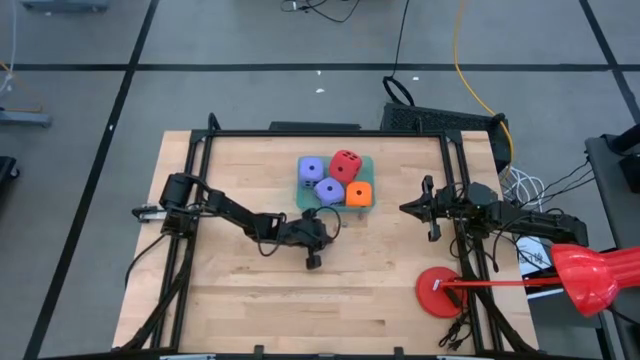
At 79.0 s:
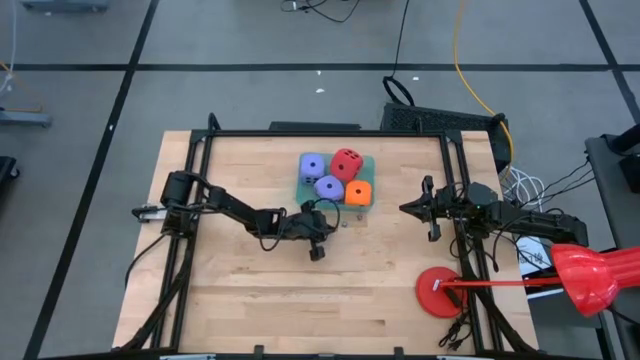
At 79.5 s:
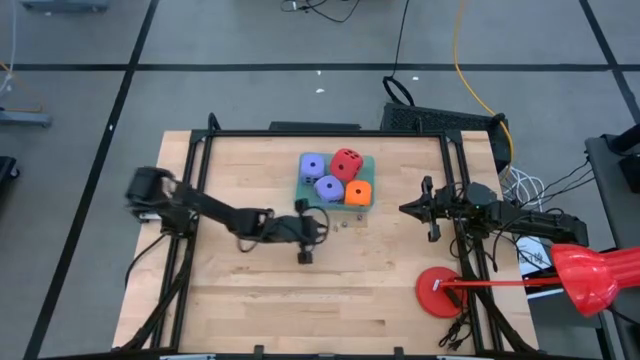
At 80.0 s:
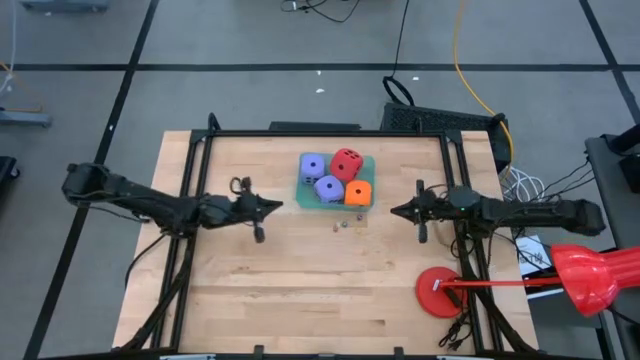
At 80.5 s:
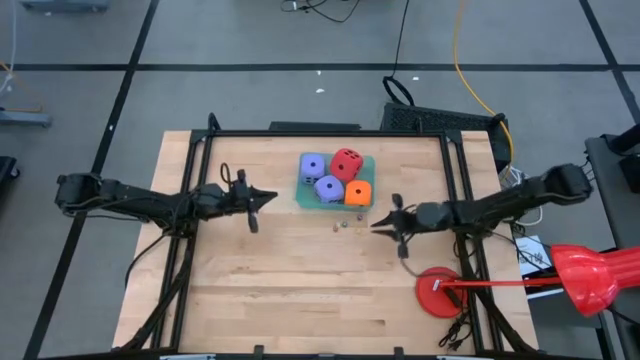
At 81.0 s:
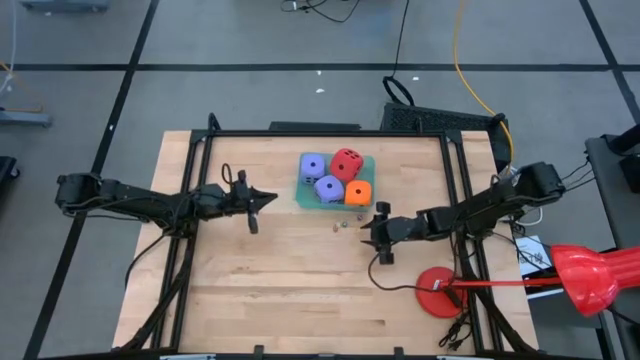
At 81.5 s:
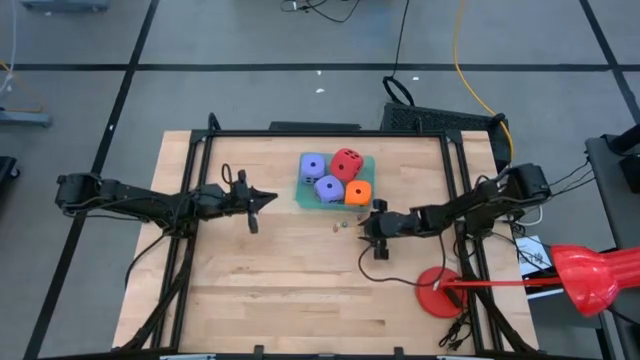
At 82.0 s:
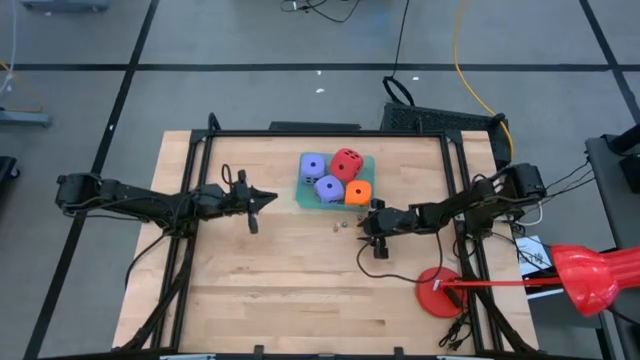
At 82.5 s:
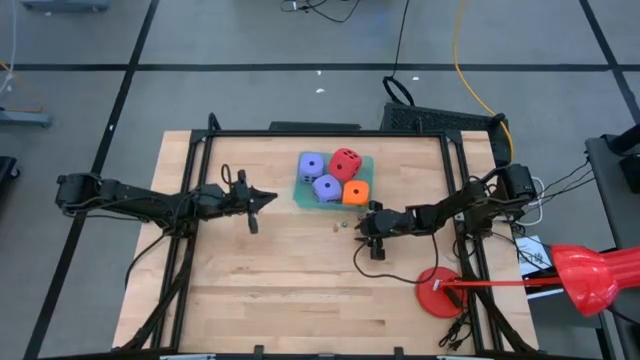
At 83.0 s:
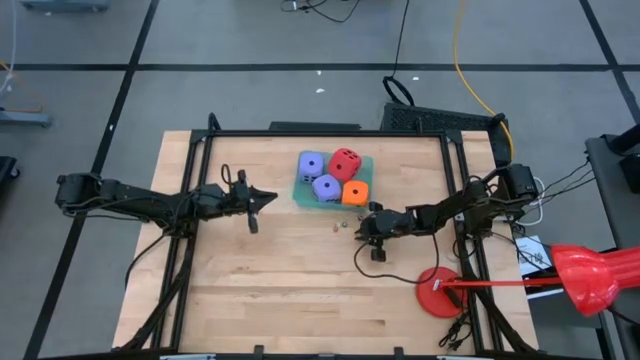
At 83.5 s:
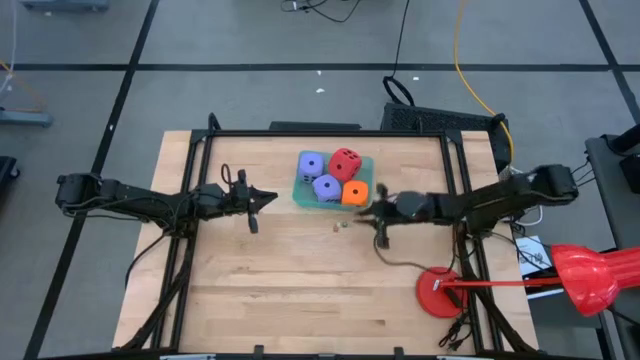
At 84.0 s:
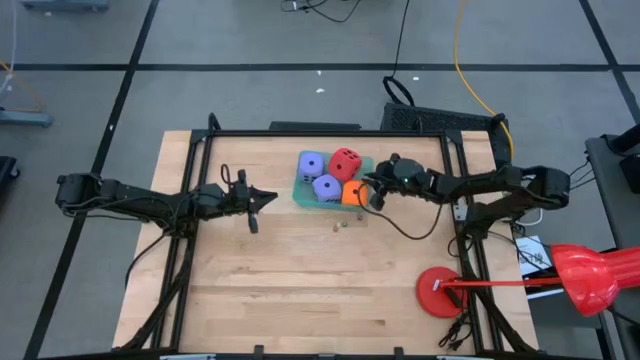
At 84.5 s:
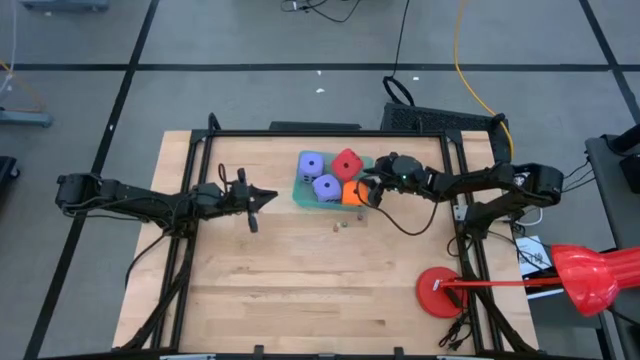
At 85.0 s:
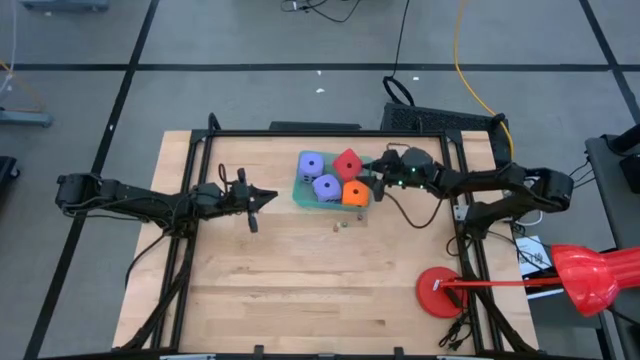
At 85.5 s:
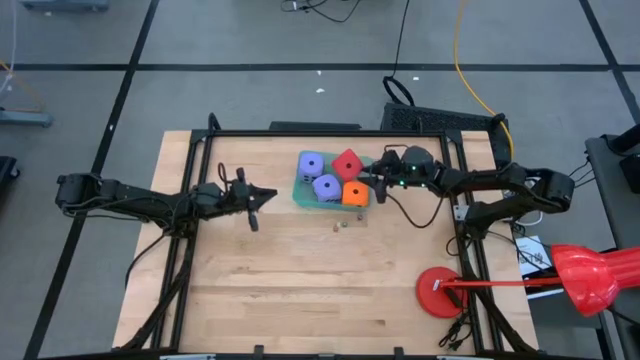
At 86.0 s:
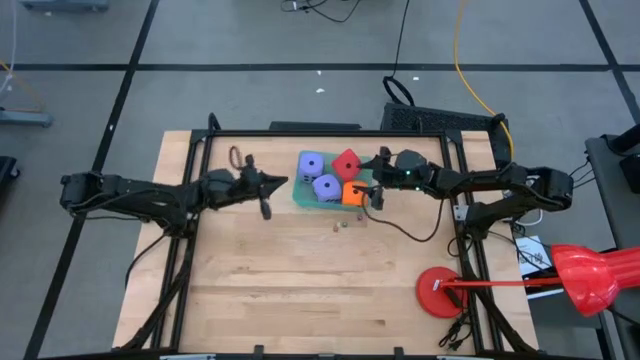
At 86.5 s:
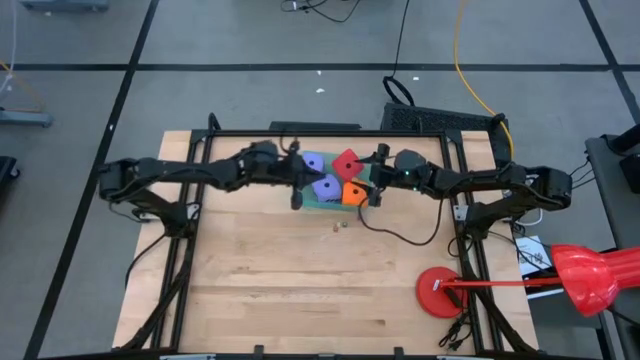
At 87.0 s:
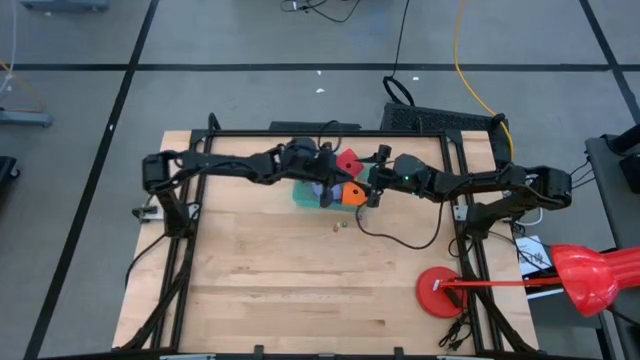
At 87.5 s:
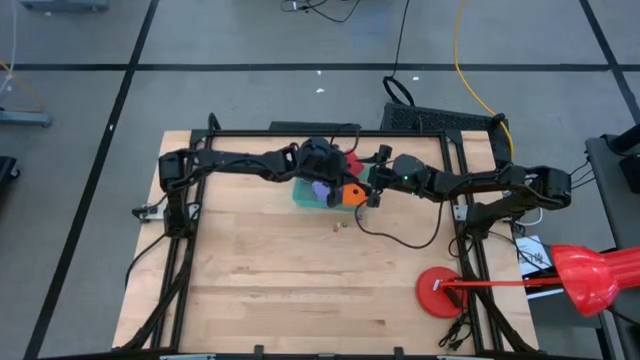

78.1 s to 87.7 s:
Task: Pick & Place Dice
Put the small orange dice into the basket

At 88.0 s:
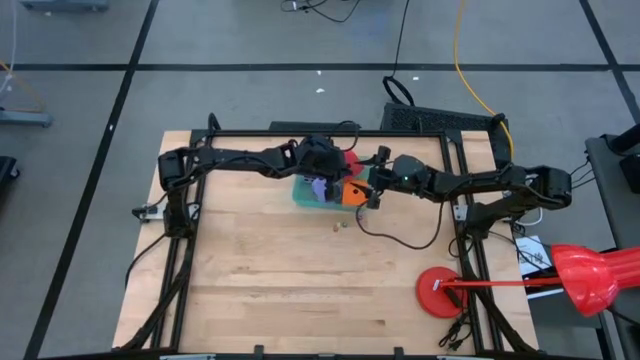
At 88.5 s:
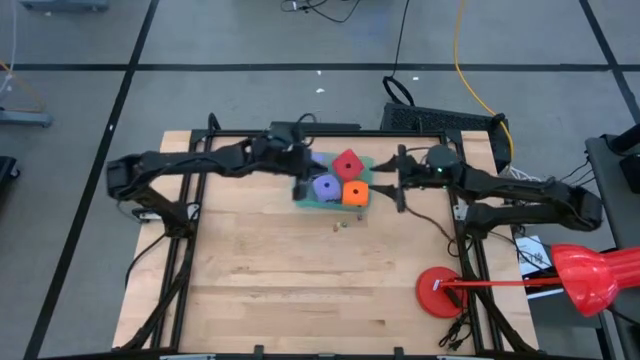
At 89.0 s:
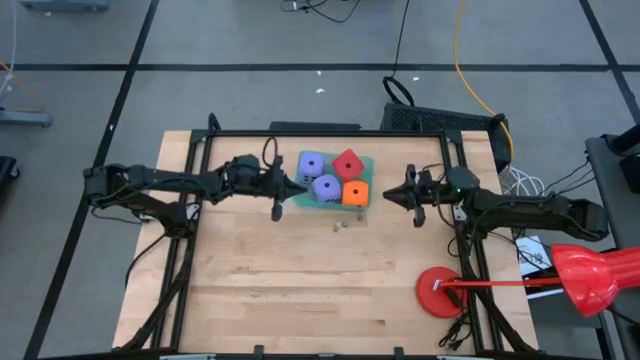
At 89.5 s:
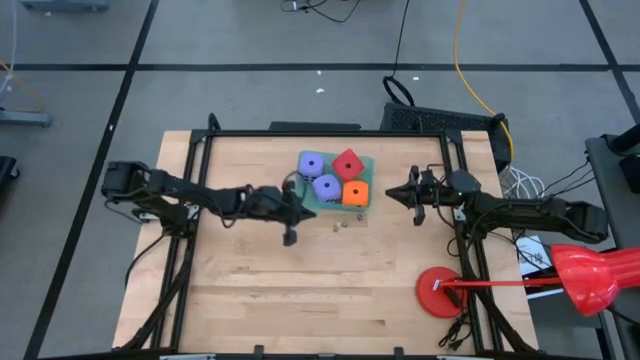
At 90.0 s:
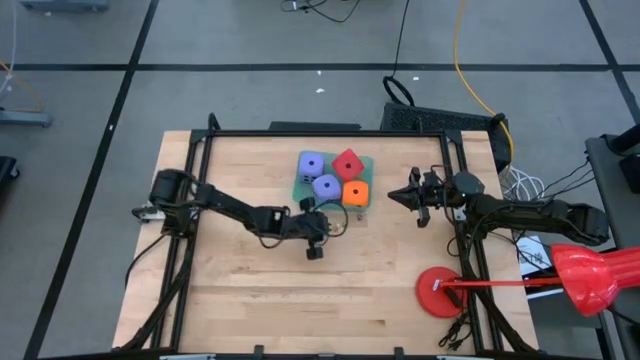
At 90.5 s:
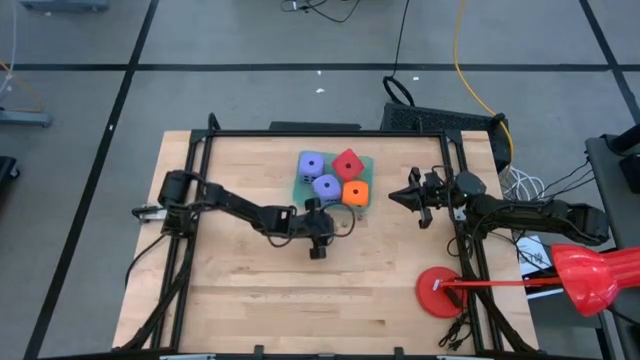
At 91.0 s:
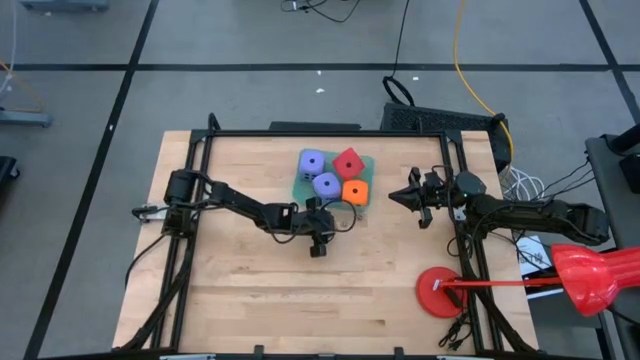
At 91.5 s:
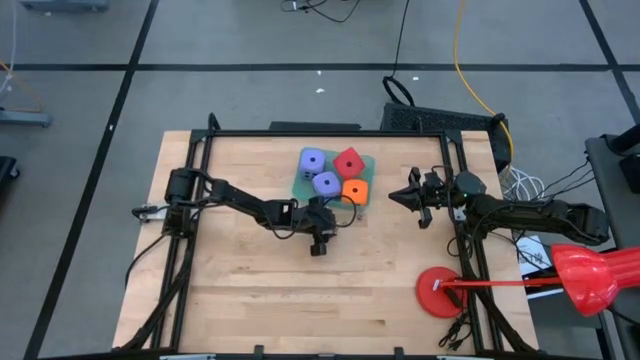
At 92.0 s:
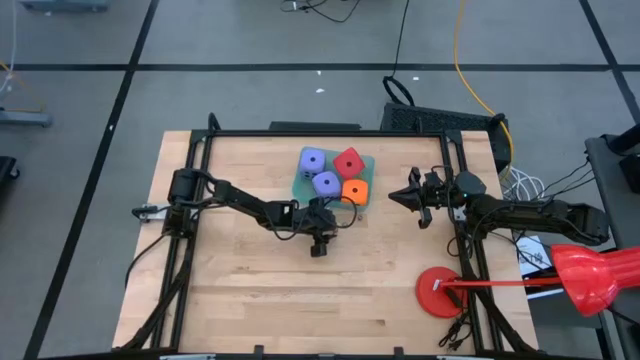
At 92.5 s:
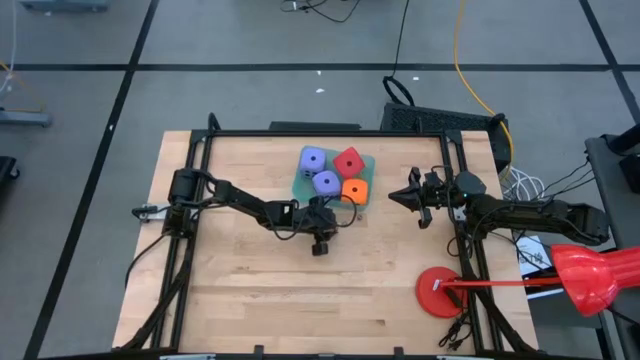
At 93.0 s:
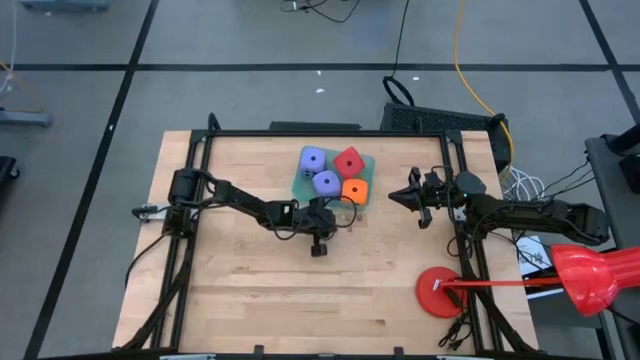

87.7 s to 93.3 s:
Put the small red dice into the basket

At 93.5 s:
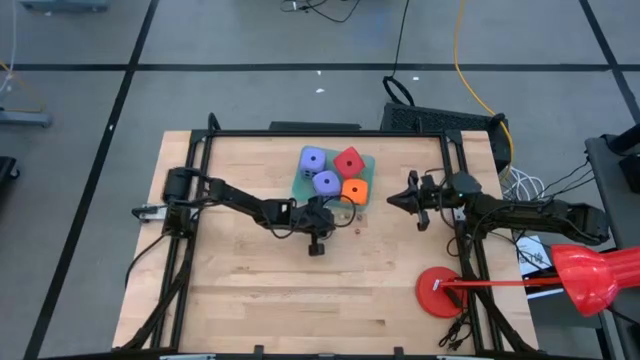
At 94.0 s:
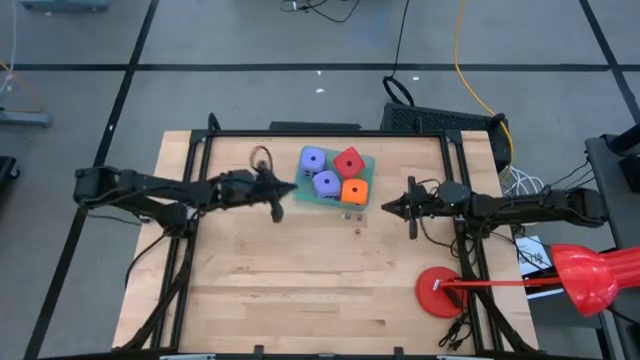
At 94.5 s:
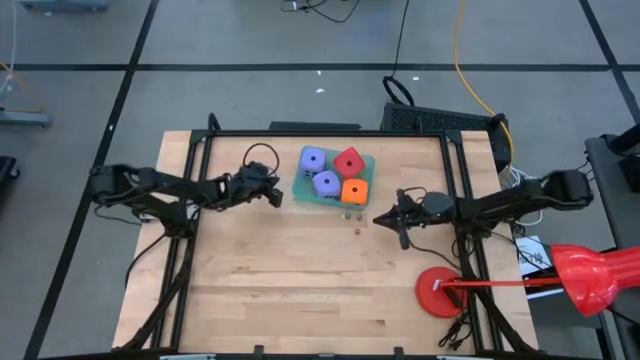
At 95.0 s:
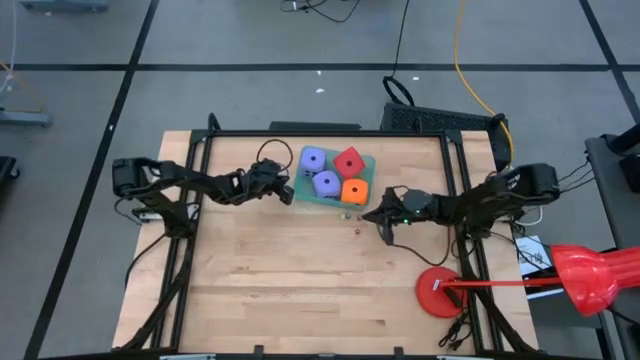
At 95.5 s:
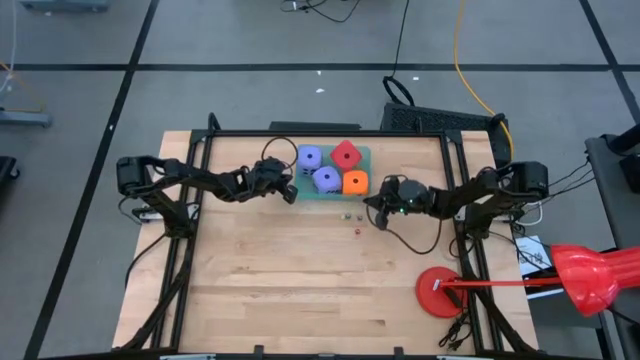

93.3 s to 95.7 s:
Adjust the basket

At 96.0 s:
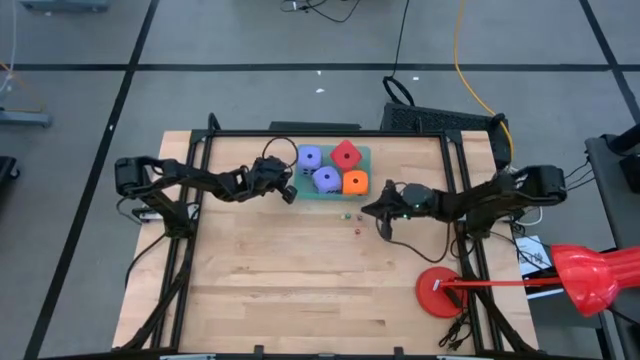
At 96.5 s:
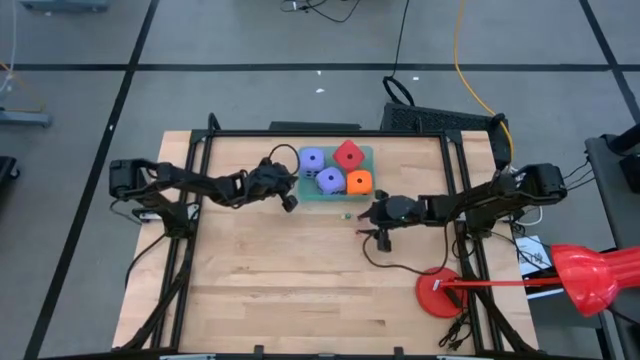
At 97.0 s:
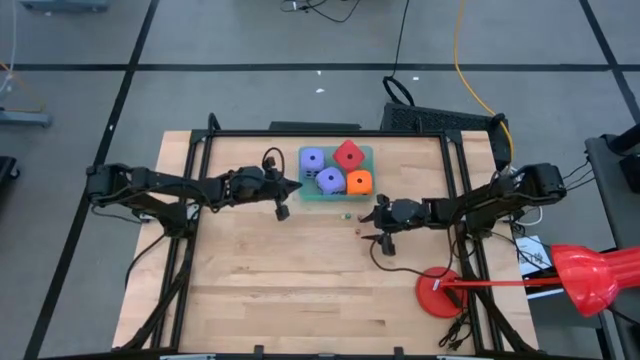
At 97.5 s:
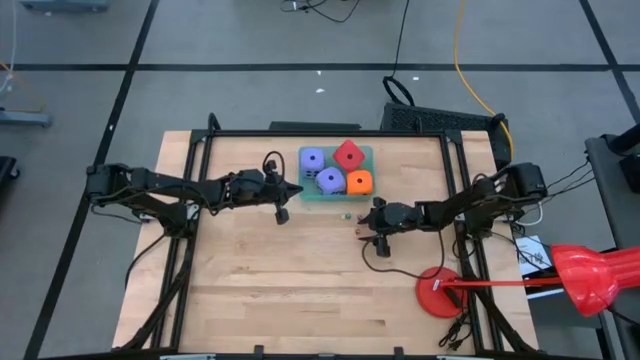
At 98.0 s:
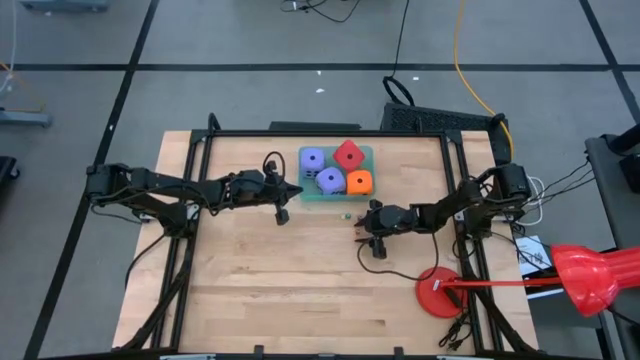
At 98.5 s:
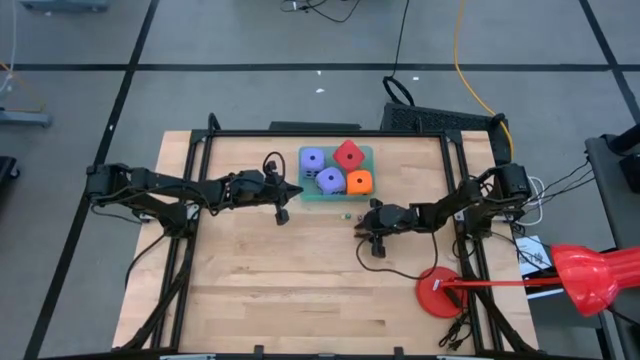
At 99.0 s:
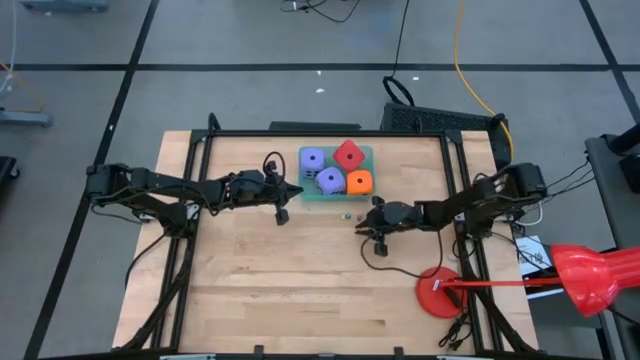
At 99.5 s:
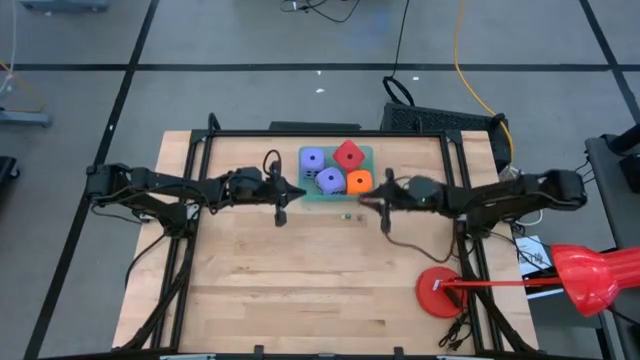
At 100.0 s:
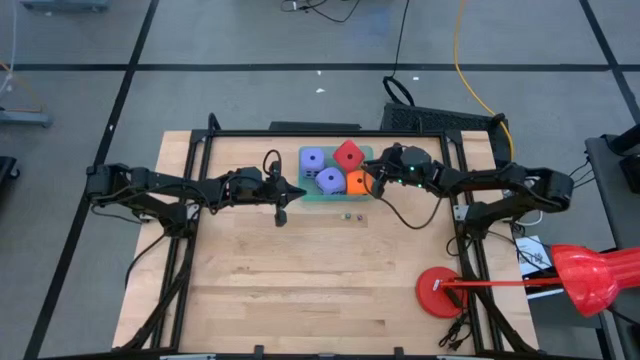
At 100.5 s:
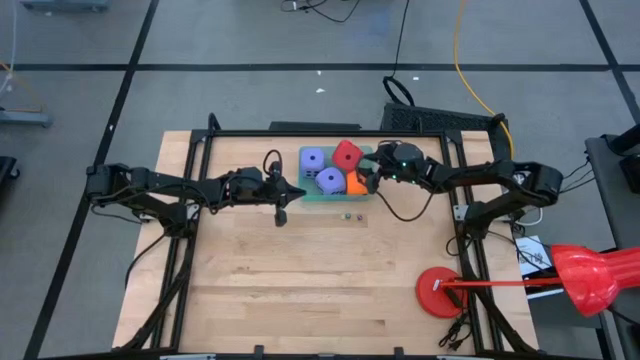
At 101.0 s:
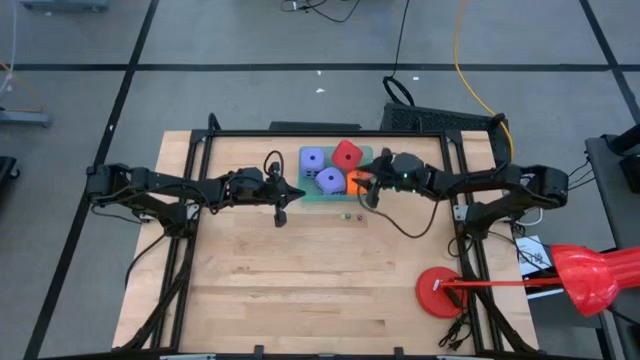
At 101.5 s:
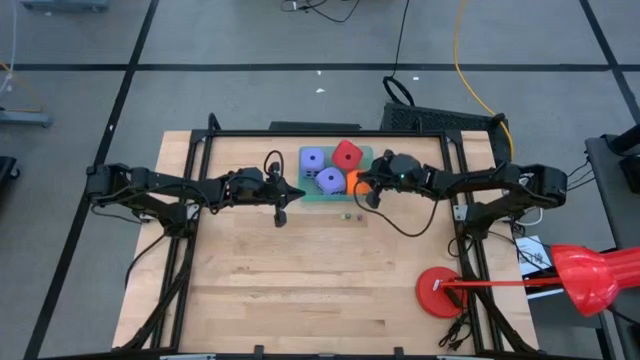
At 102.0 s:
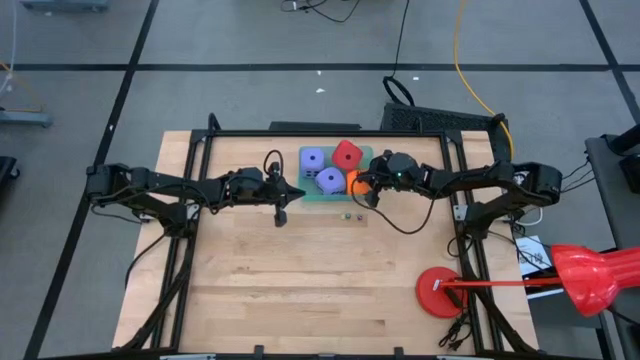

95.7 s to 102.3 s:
Put the small red dice into the basket
